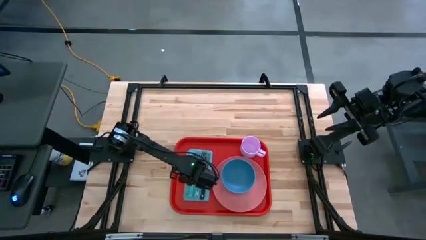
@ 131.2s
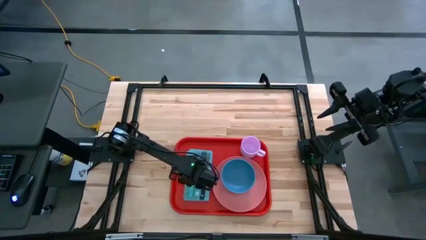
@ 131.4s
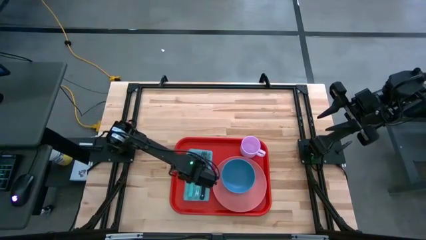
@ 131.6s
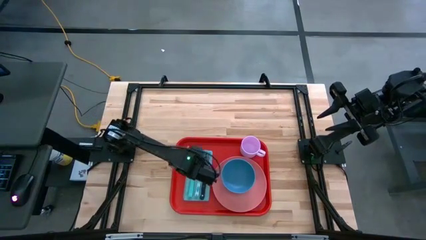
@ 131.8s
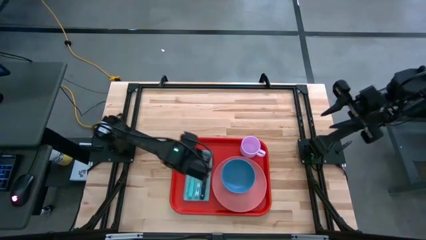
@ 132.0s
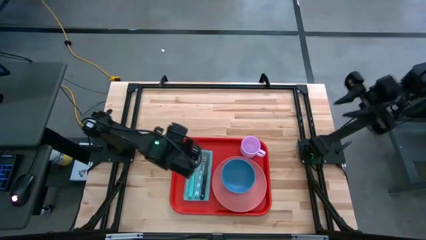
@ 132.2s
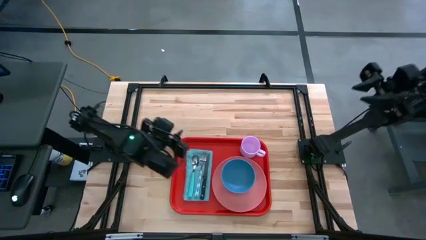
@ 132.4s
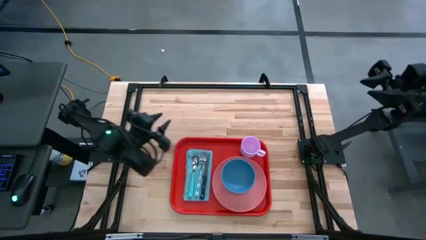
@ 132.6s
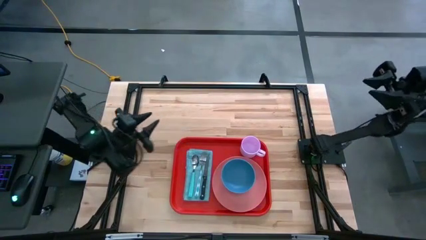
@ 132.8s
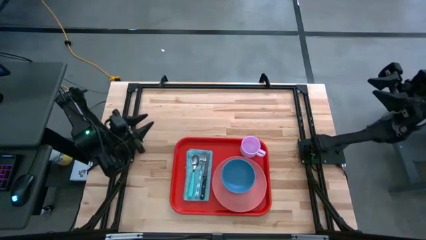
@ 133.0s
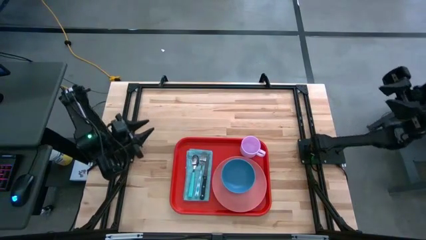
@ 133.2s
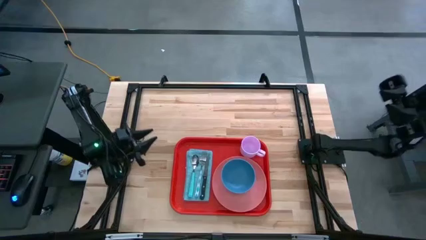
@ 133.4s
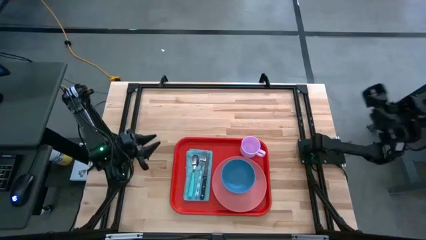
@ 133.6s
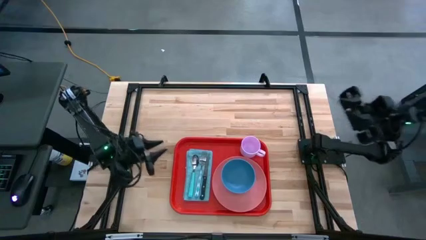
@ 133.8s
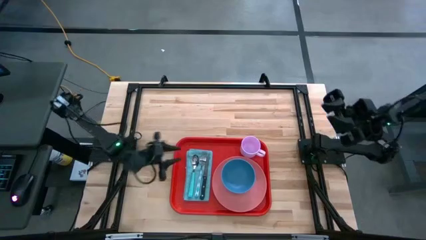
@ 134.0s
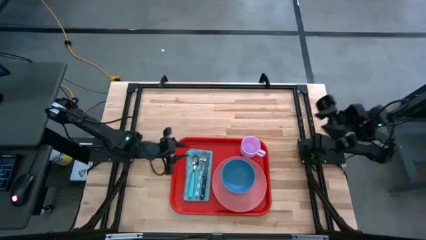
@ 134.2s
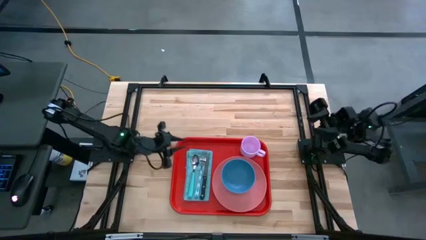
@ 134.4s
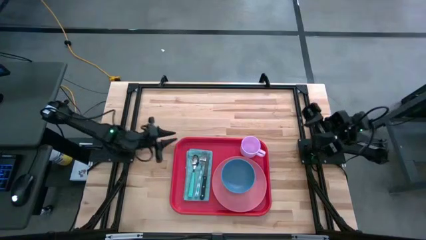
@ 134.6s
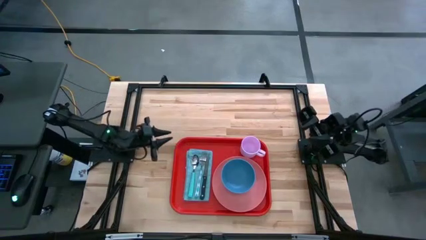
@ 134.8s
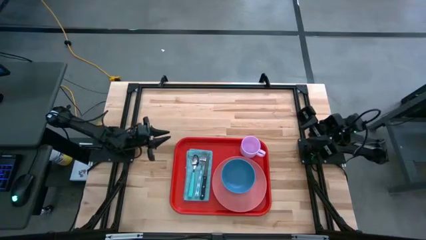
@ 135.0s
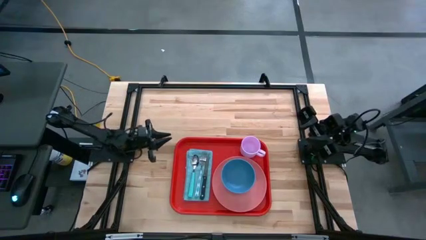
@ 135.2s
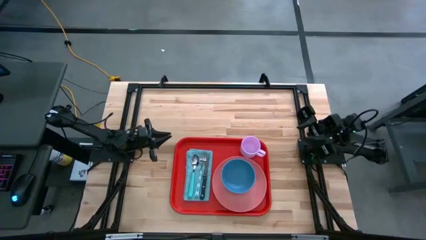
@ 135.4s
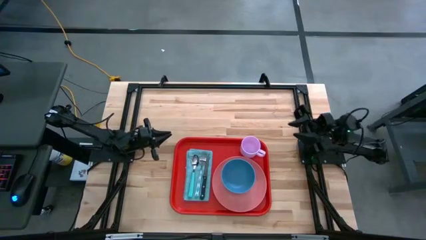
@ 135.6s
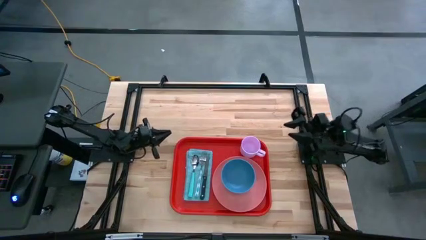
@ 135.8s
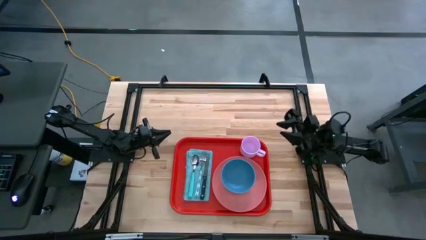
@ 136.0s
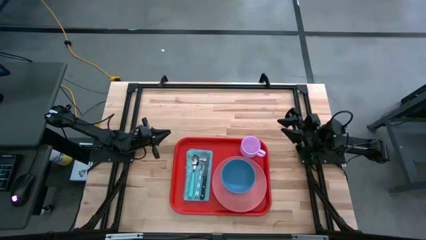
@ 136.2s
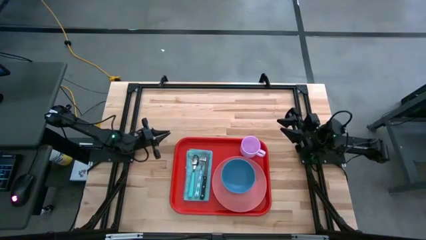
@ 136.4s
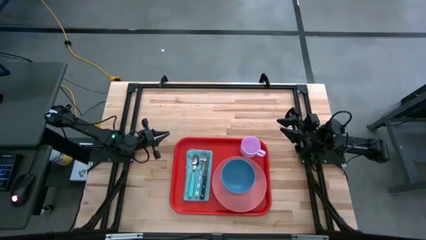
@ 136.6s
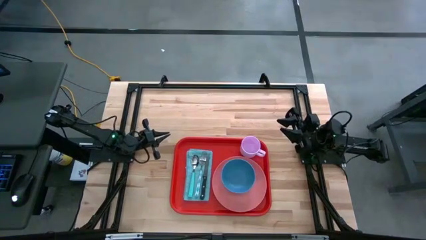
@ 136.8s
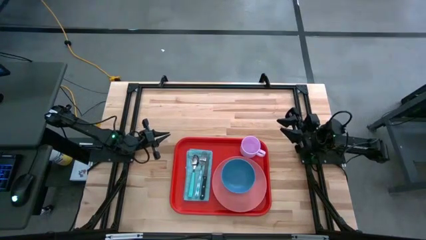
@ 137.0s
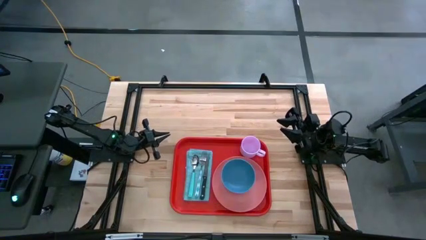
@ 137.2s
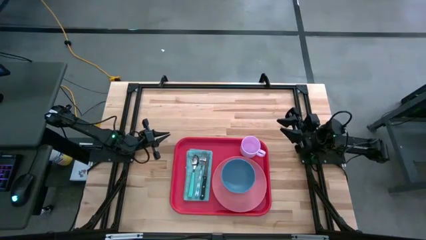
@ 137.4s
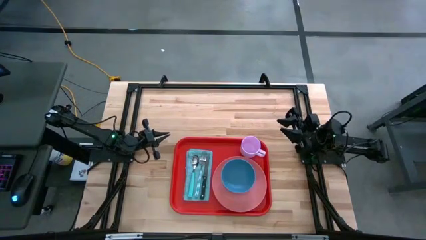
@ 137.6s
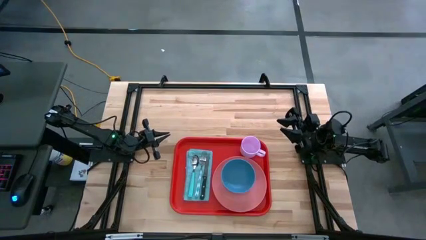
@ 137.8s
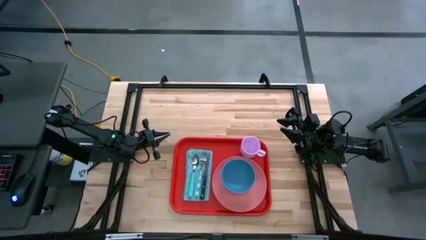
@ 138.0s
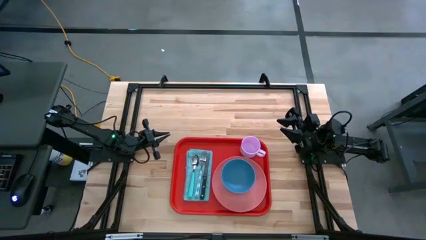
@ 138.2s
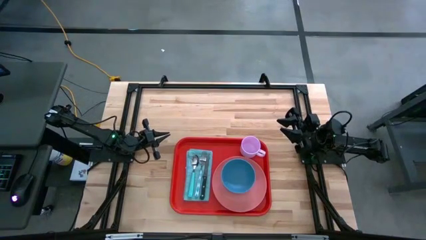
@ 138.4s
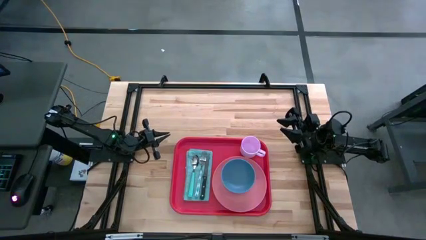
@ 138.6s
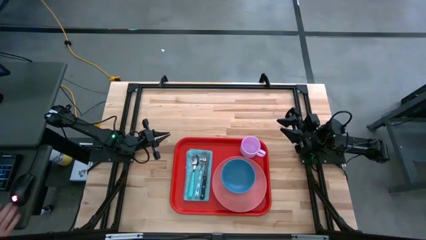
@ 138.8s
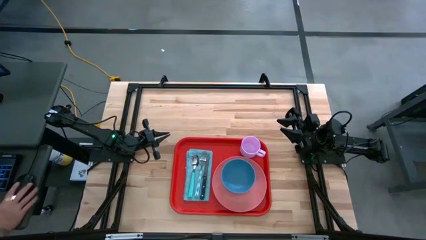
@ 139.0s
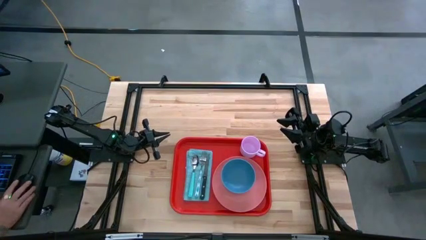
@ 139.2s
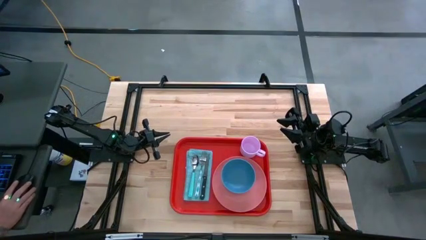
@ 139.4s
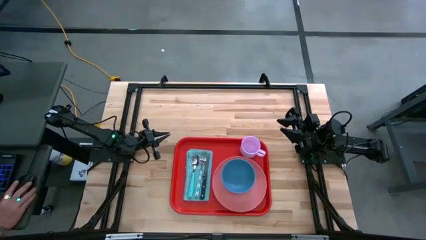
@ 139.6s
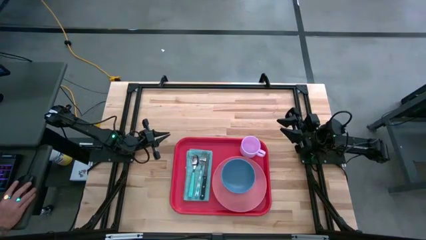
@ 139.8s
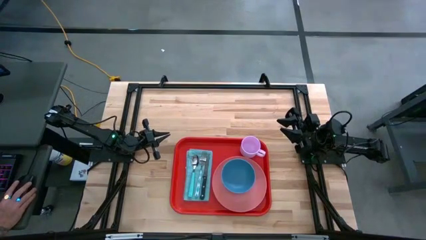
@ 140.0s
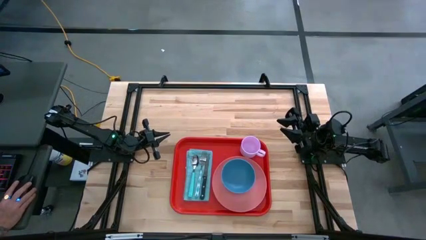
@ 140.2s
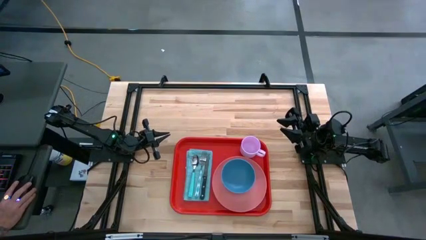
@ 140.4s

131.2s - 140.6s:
Task: Set up tray
Return to Home Position

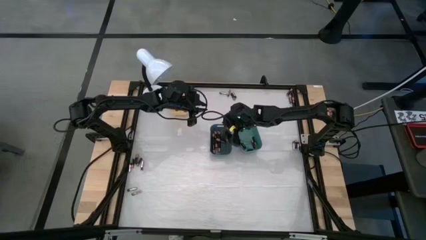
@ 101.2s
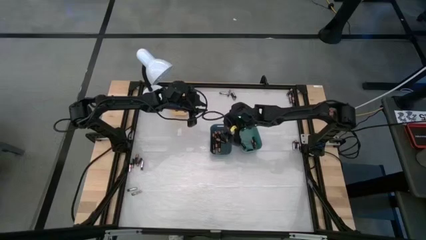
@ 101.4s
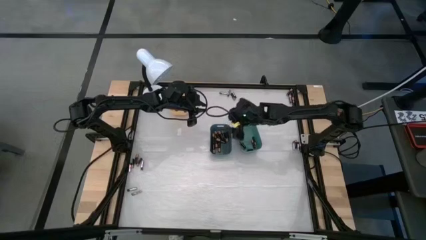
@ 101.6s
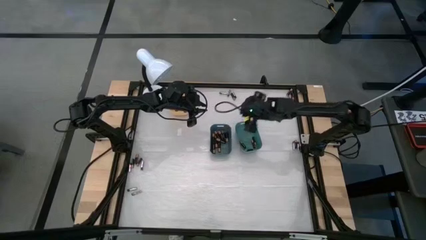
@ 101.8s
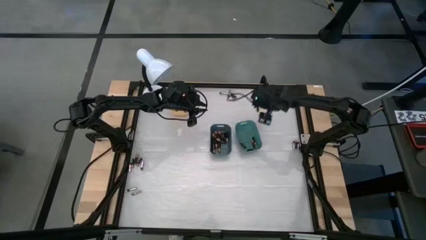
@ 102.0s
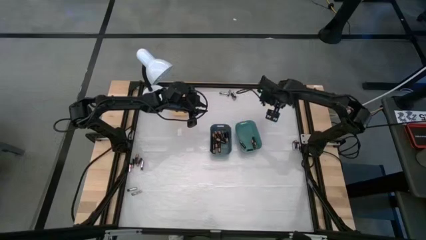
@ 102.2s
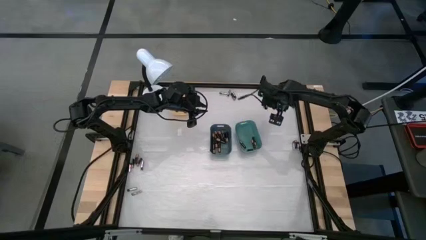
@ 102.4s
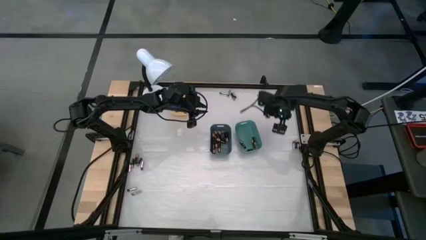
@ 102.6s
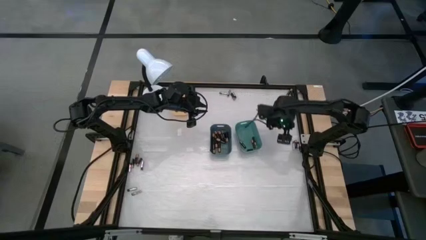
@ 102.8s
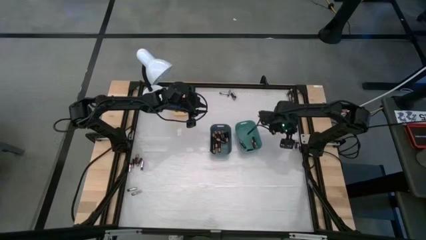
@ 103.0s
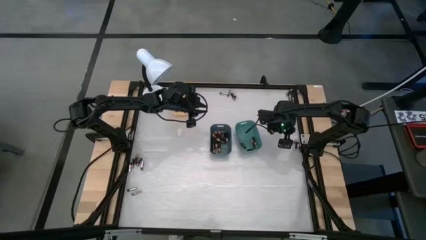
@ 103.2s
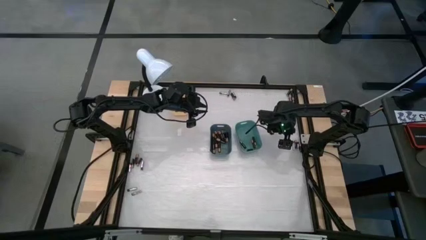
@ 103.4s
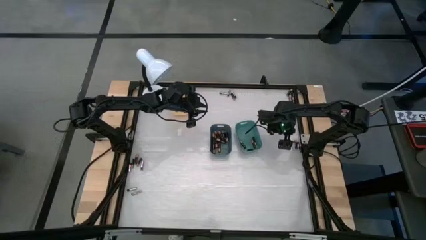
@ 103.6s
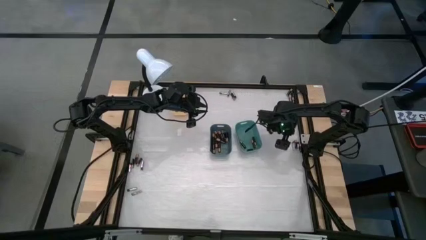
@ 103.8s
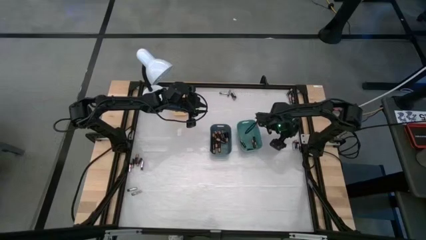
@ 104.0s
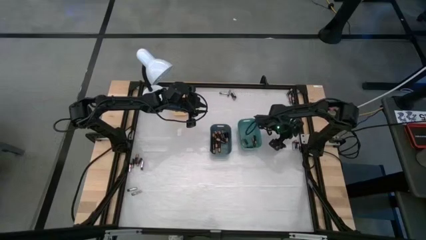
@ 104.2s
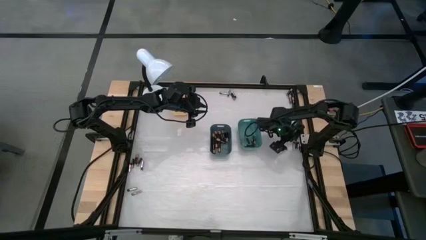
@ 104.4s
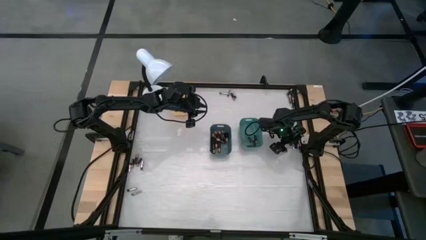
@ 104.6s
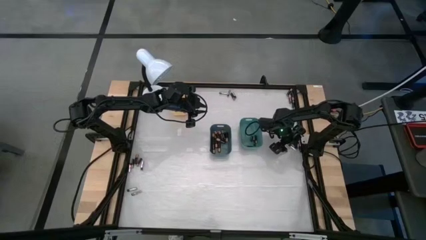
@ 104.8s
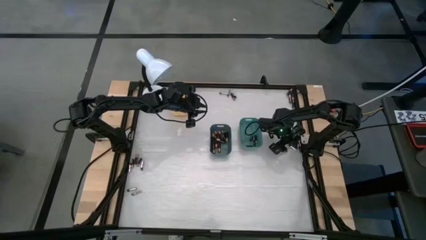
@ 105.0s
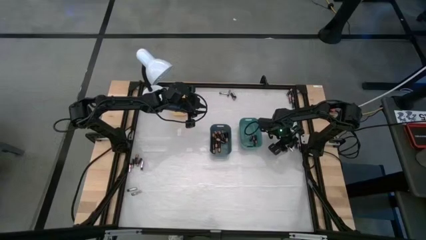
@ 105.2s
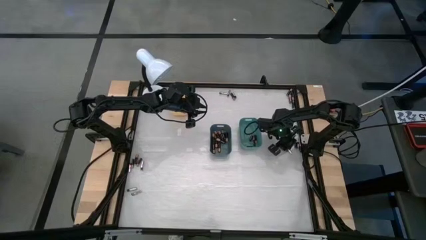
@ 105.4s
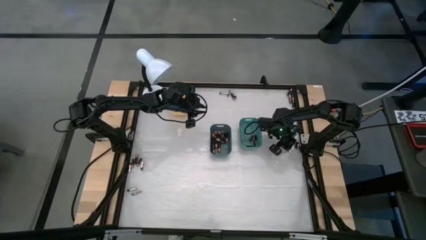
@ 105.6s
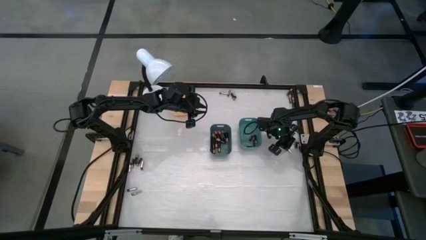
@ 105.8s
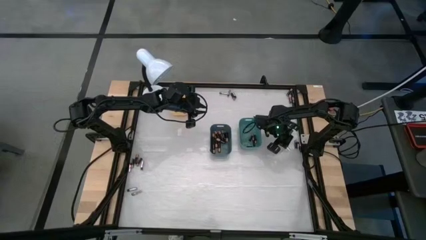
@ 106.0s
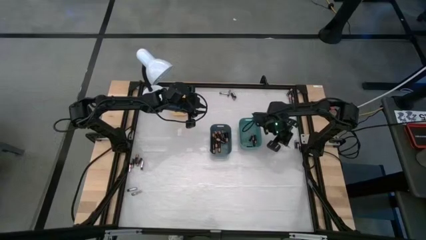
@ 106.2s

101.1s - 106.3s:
Task: Sort batteries
Put the silver battery into the yellow bin
